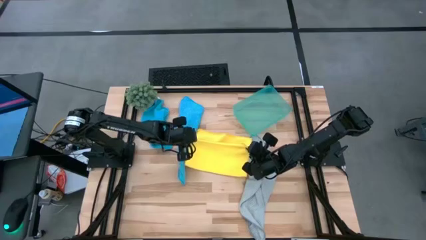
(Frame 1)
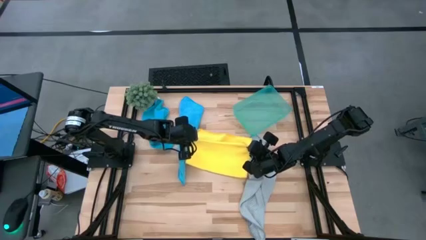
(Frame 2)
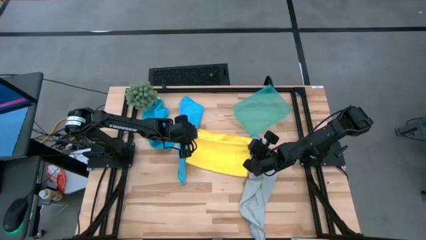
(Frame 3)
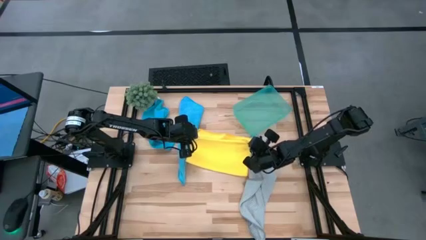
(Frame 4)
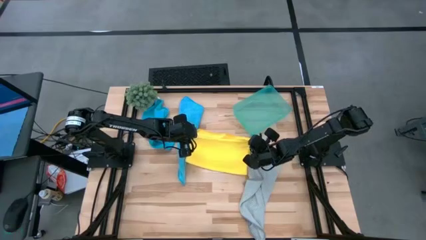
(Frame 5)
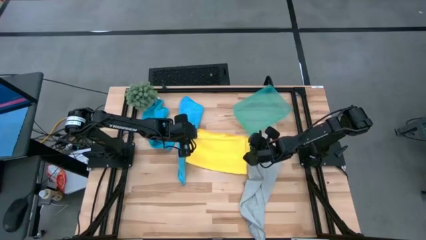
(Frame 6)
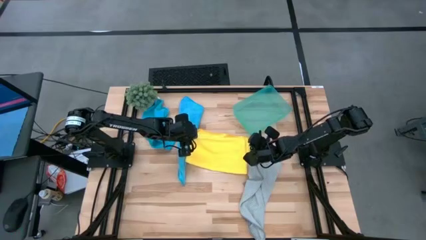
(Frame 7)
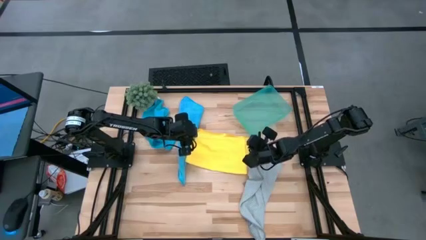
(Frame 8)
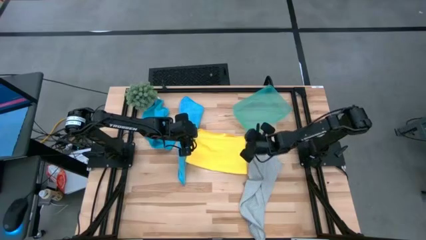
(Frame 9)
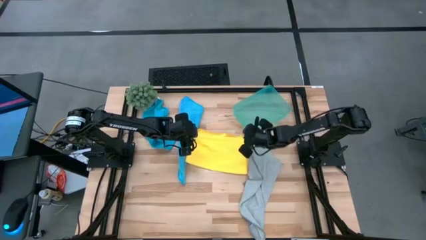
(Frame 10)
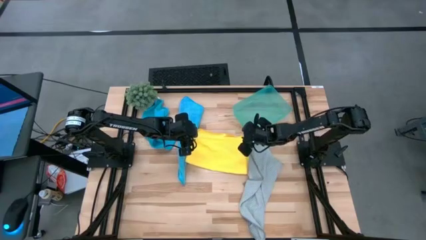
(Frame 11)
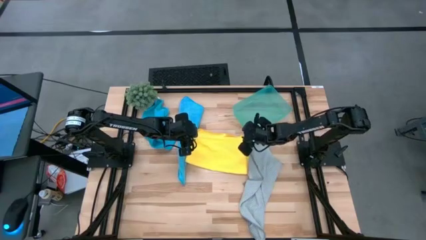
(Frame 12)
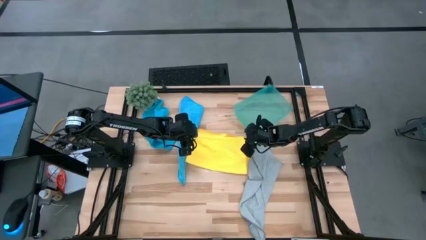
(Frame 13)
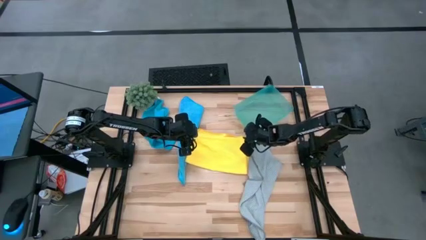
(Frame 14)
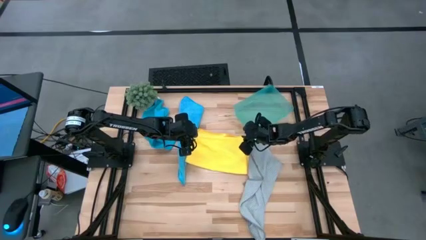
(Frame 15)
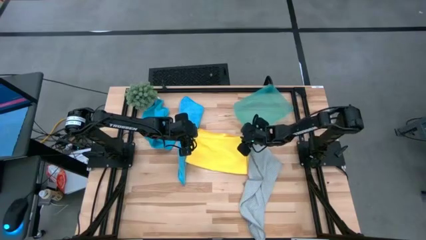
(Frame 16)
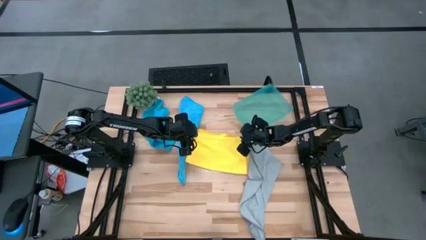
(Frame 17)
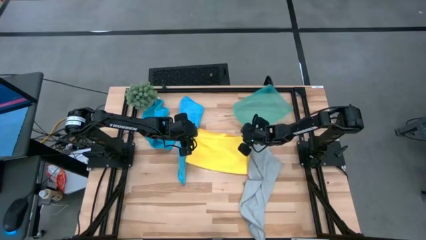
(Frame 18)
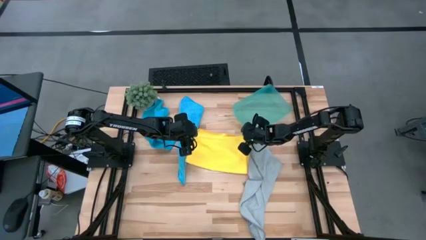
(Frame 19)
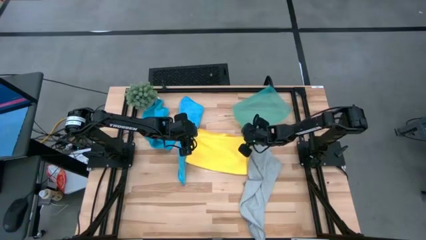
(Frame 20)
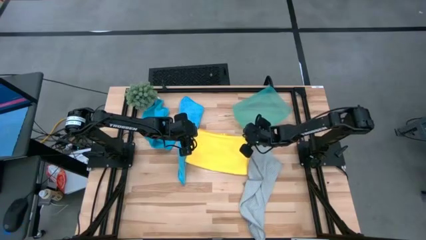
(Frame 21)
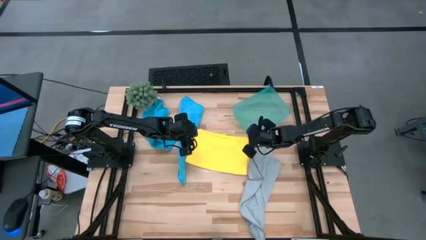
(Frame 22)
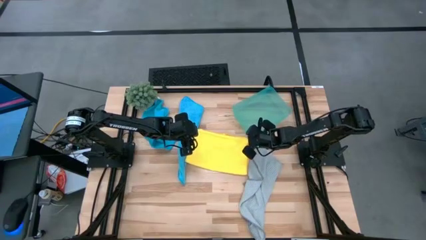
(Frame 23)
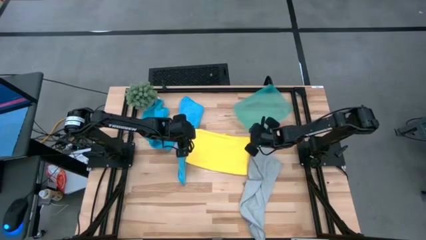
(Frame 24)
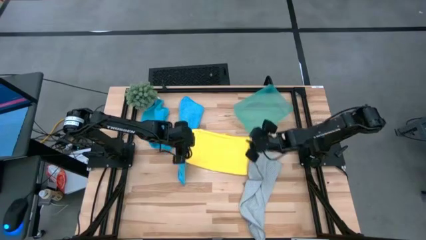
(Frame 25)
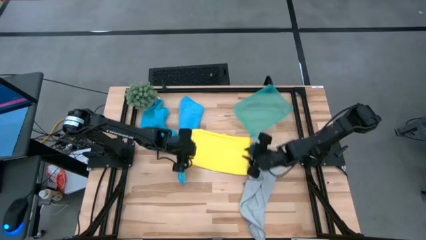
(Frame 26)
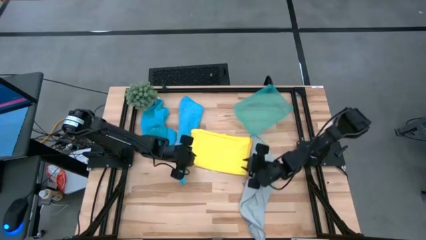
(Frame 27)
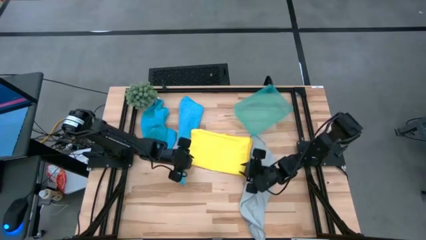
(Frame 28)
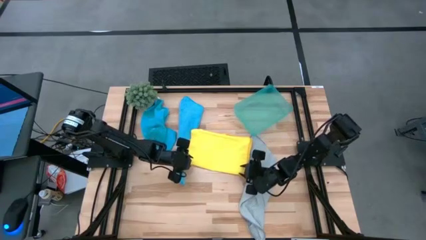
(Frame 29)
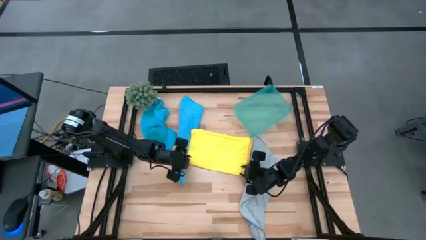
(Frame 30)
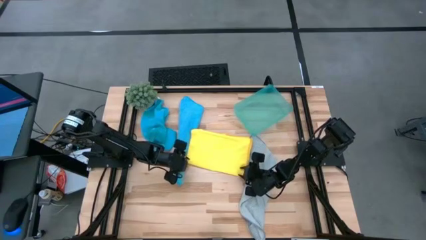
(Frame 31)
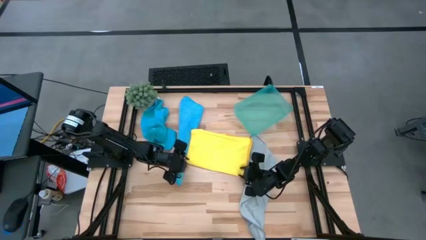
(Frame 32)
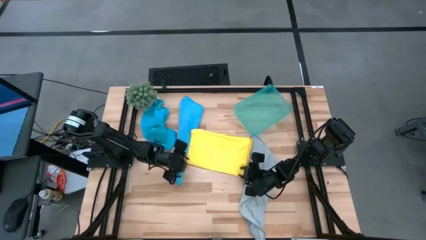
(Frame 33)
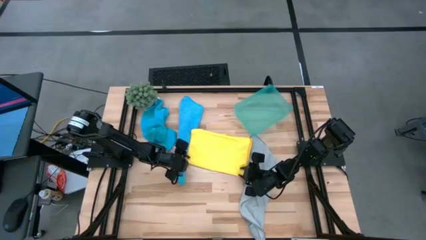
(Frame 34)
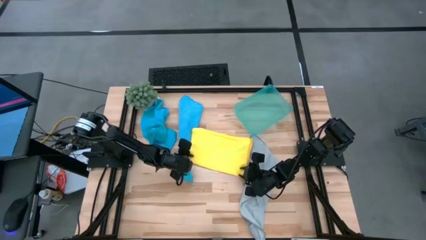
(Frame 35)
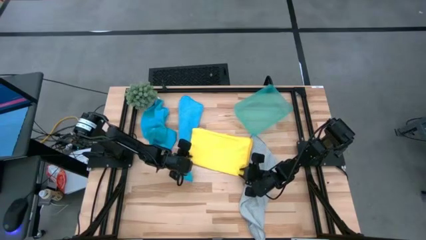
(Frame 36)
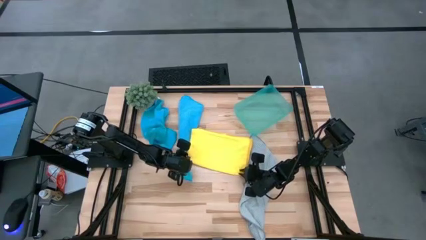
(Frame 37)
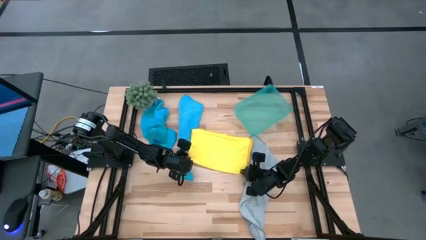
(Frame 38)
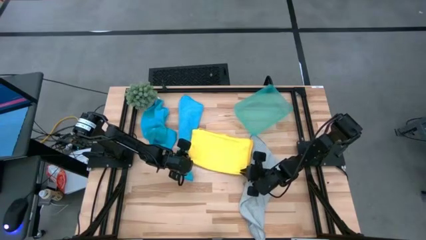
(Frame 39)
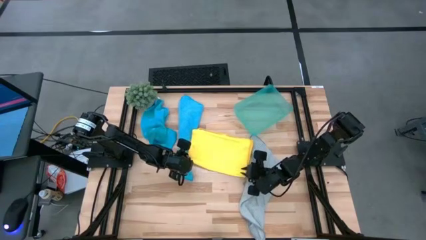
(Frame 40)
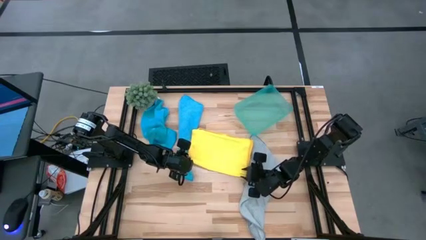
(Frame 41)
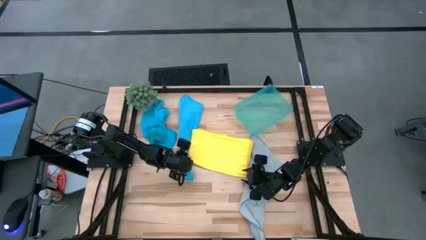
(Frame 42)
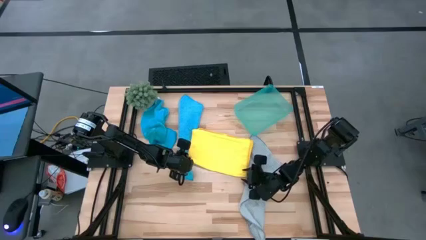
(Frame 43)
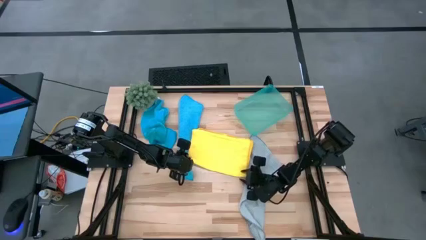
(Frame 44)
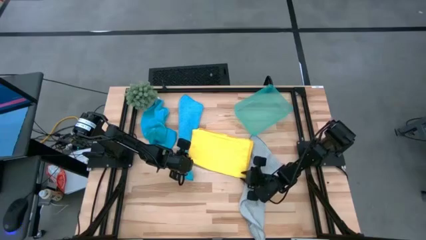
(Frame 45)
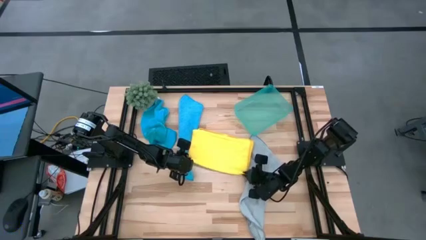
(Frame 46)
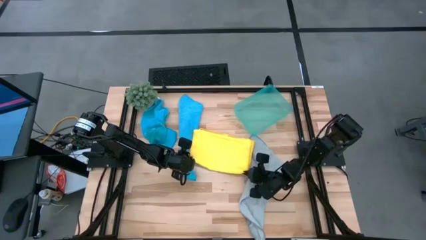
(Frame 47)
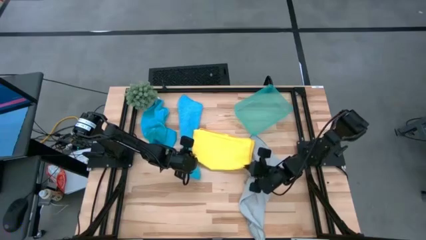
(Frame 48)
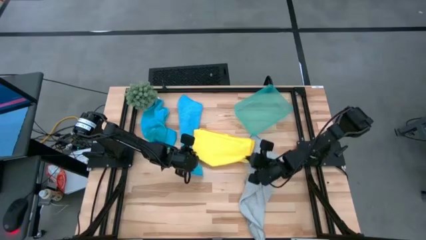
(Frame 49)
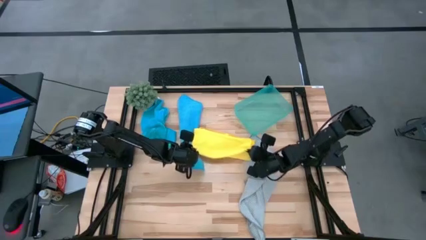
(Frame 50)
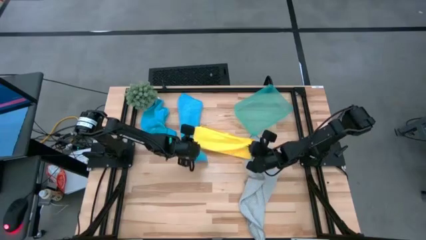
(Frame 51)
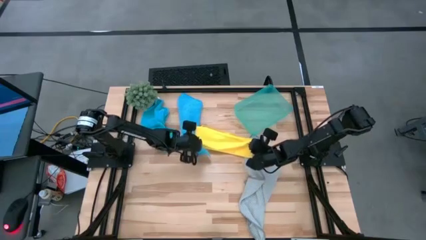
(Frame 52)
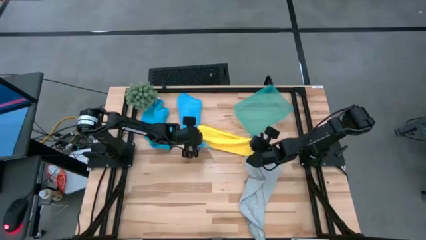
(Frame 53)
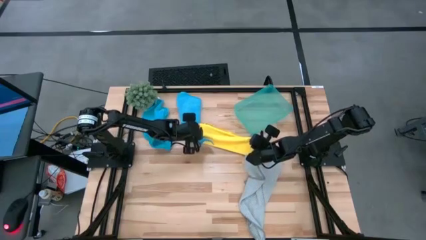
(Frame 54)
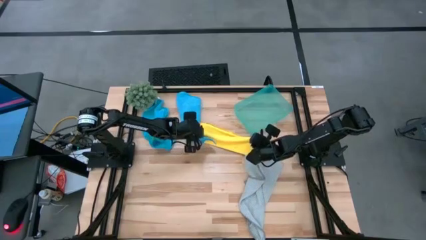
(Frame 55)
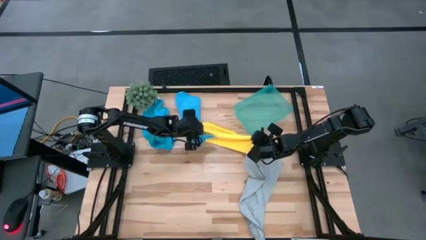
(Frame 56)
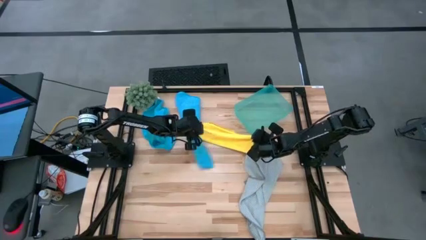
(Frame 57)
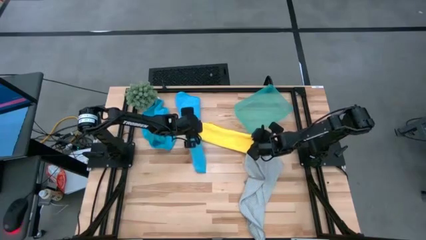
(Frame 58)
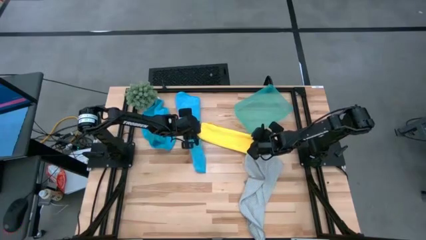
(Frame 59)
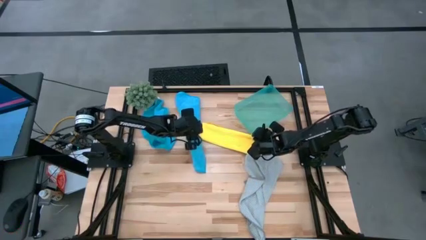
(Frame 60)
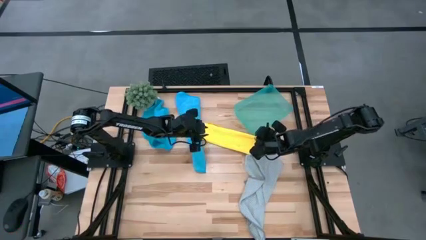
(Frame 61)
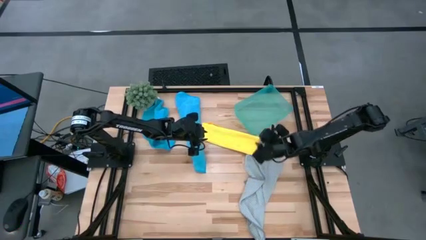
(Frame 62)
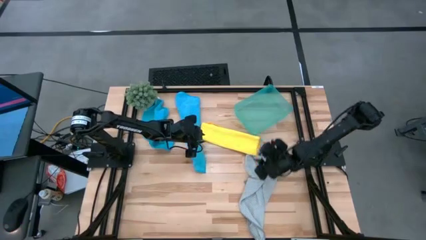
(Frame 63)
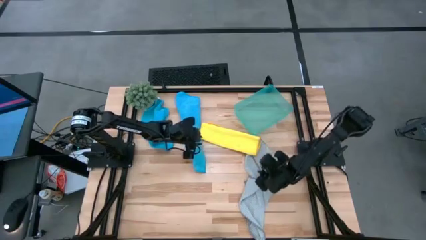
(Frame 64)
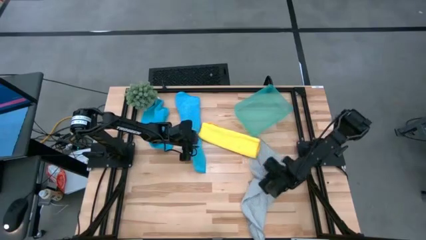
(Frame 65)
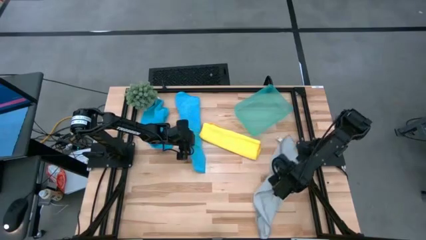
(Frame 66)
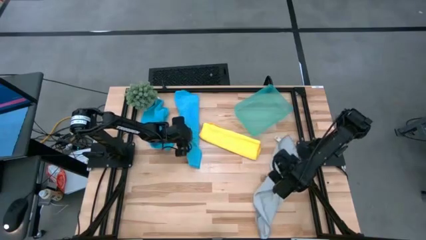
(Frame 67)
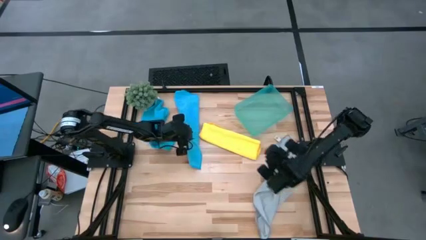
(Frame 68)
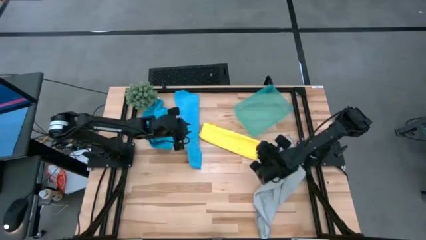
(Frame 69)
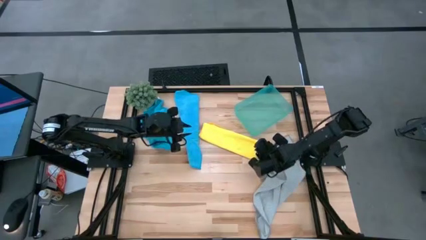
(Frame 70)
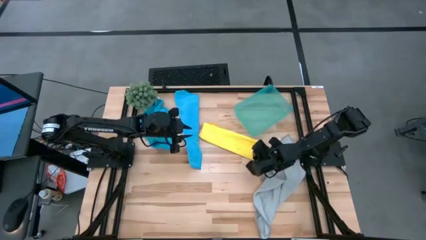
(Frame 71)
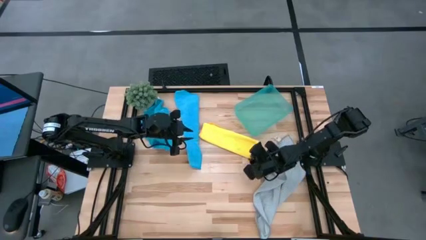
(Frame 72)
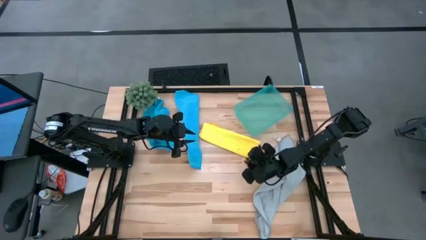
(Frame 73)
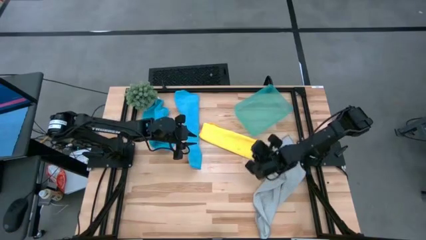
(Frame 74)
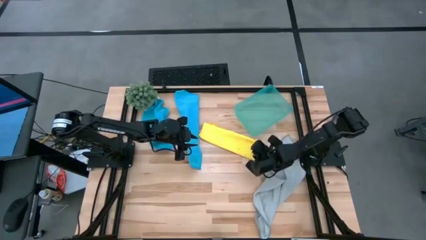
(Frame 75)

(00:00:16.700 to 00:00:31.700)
Task: Fold microfiber towels
Fold the yellow towel

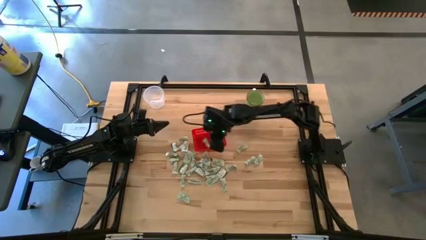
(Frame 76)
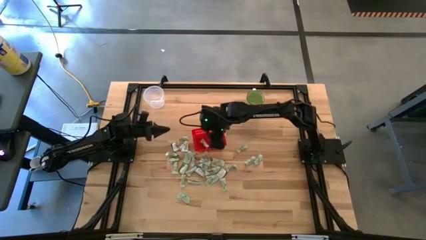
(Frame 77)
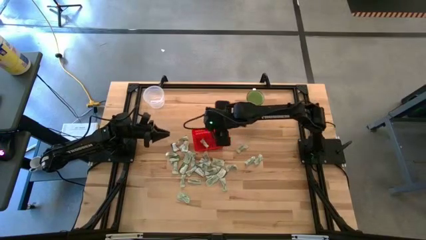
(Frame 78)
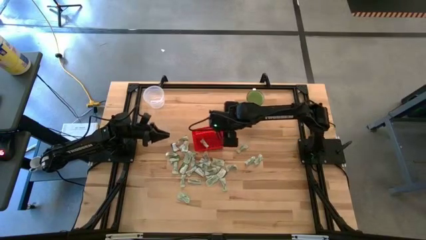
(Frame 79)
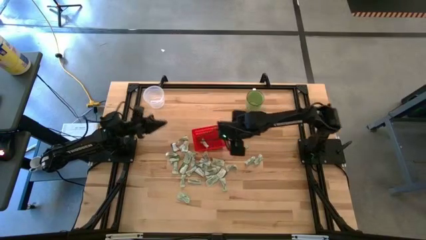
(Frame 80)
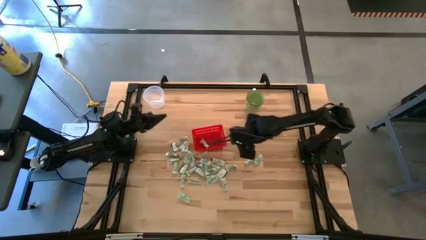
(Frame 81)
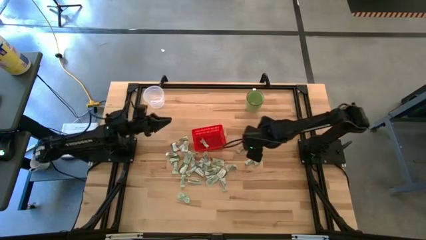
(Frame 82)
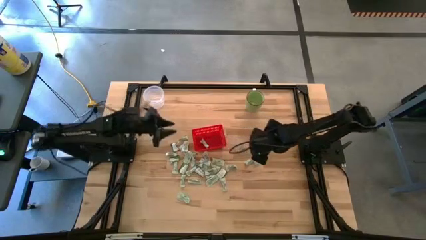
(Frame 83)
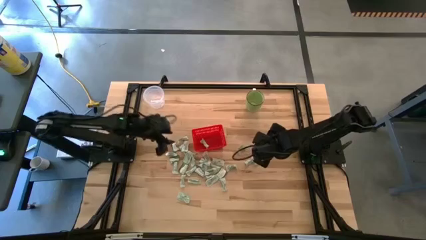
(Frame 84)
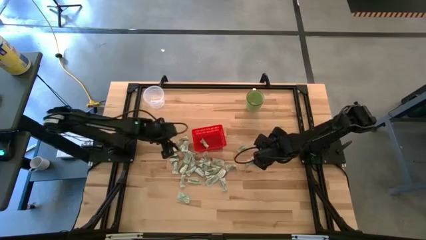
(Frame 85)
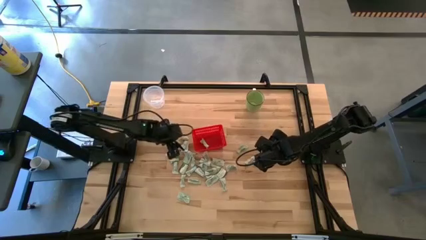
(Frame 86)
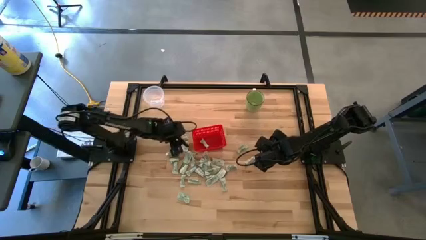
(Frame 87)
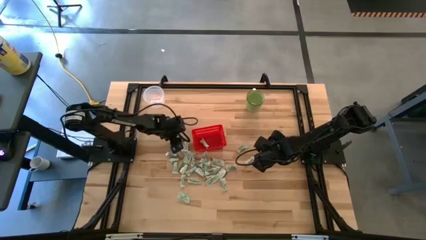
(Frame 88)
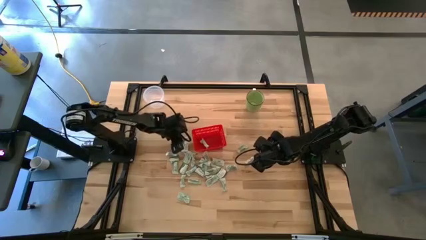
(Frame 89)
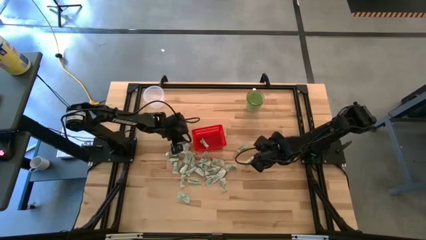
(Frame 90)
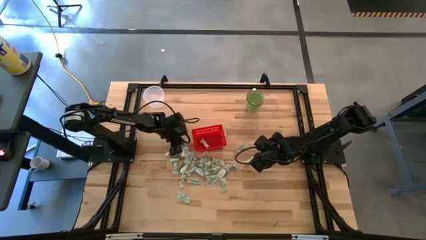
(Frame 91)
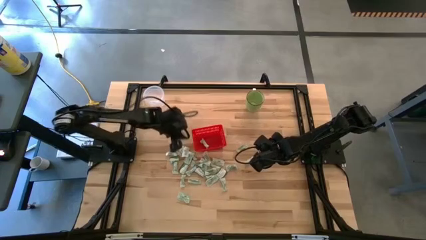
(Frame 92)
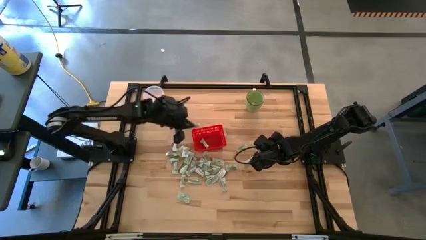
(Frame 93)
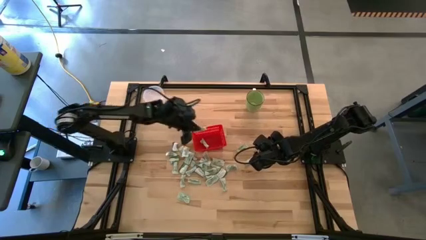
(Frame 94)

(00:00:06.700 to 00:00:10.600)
Task: Pick and place Stevia / Truvia into bins
Put the stevia packet into the red basket
